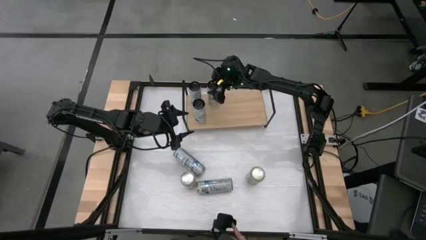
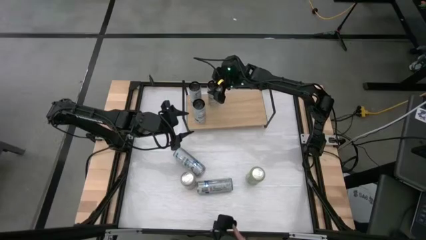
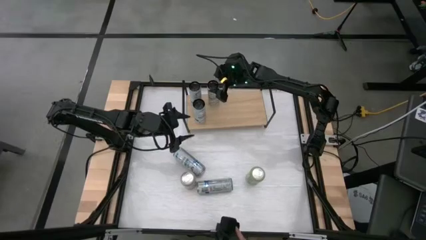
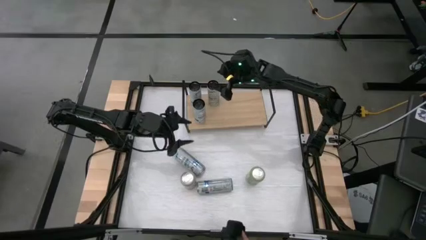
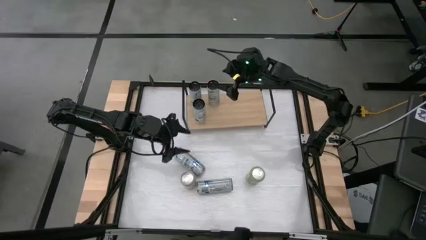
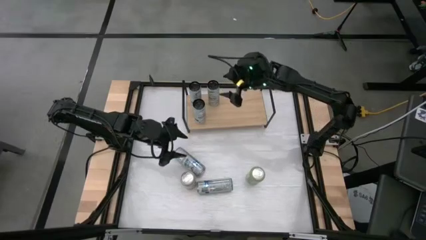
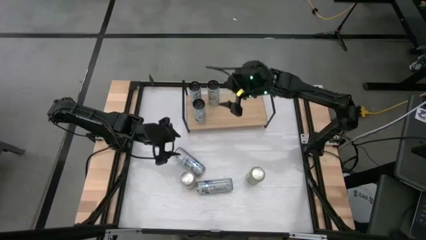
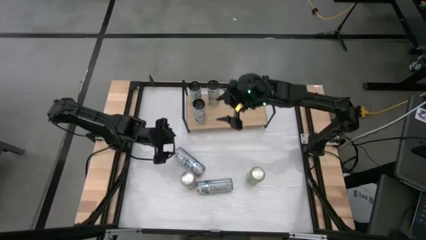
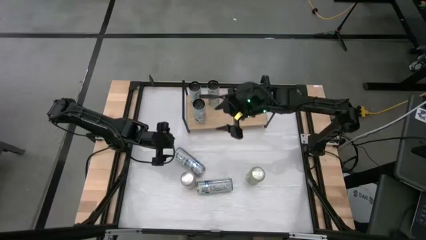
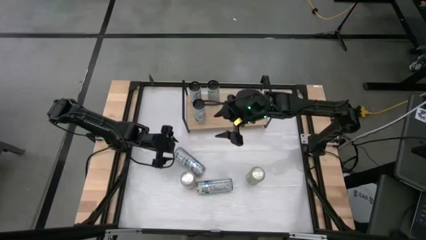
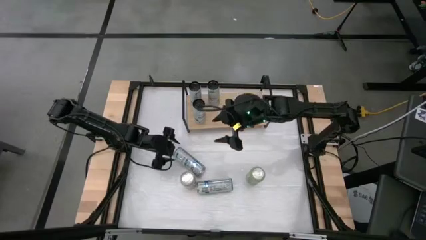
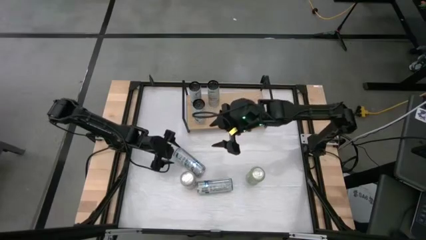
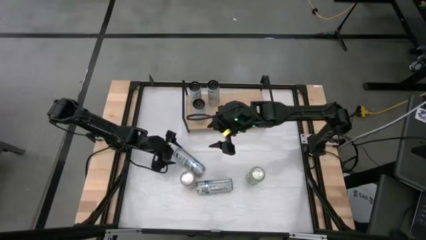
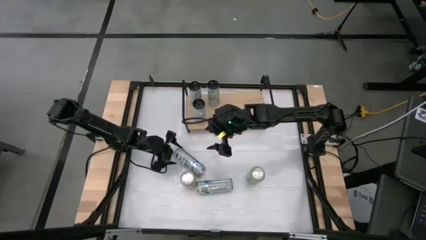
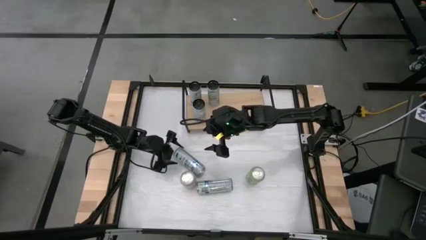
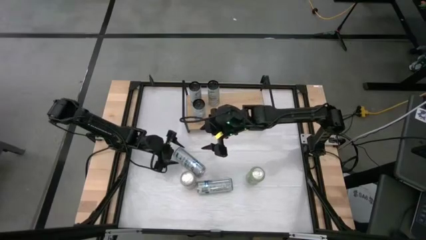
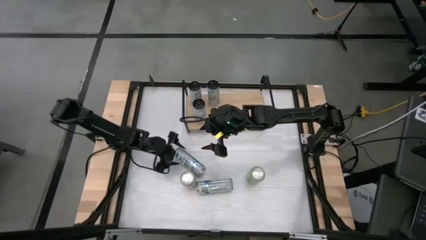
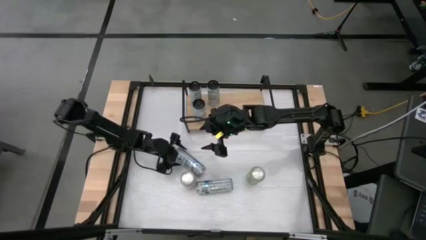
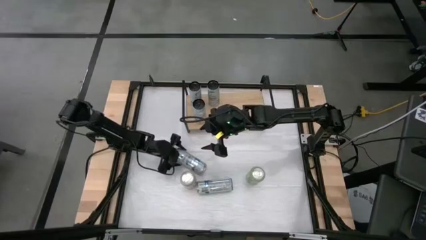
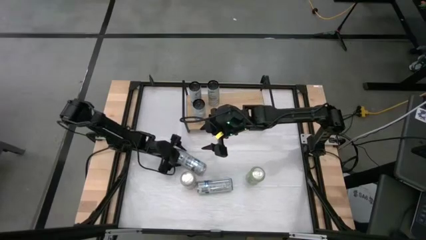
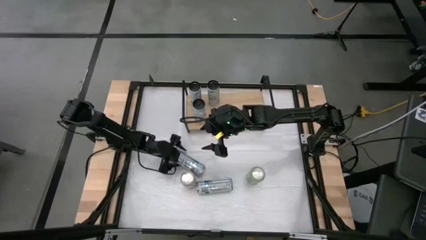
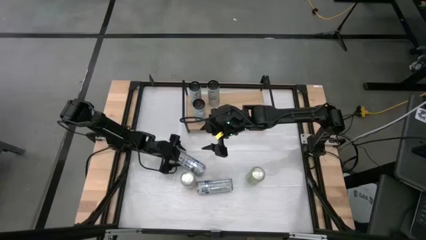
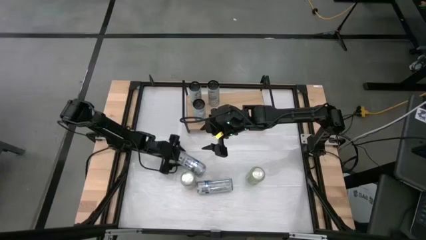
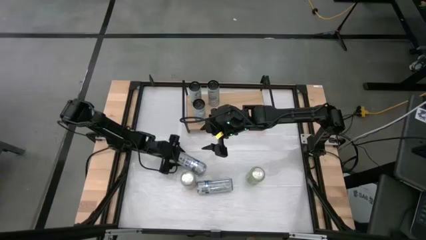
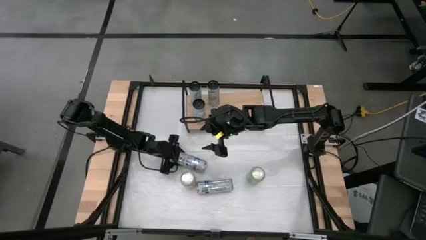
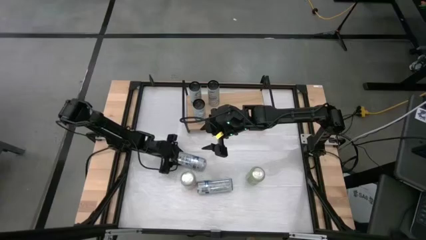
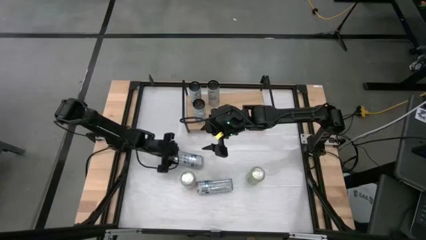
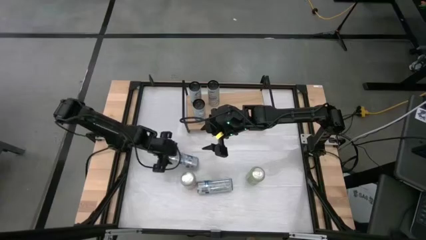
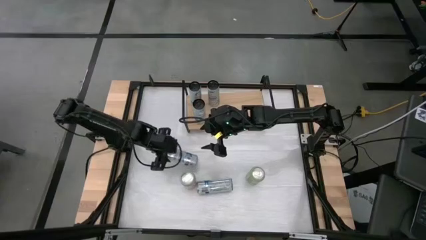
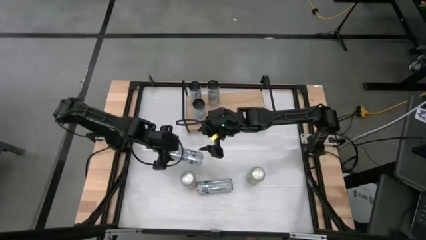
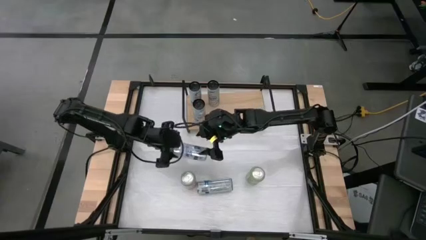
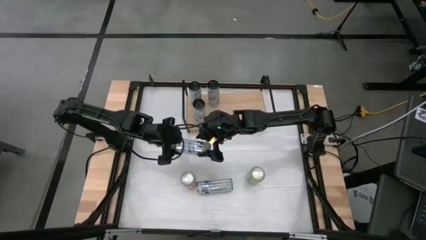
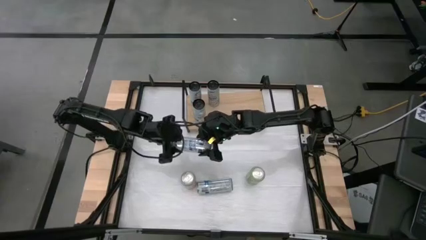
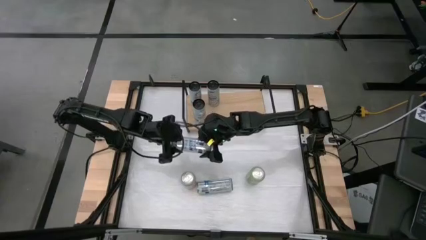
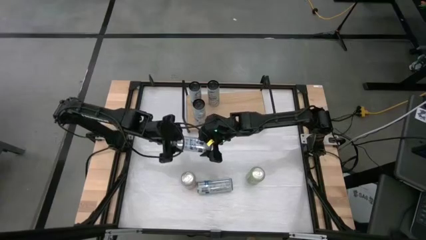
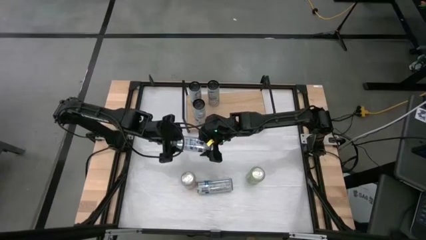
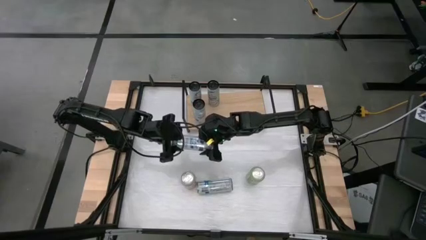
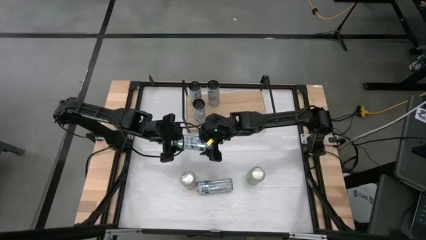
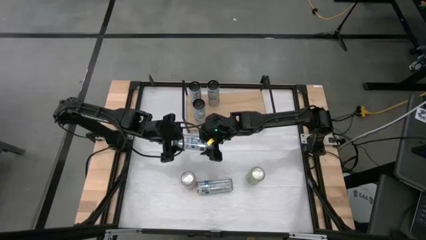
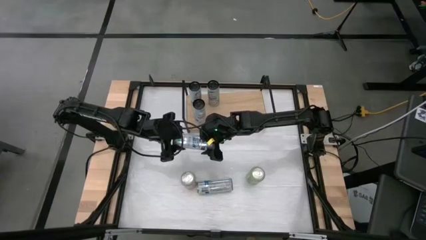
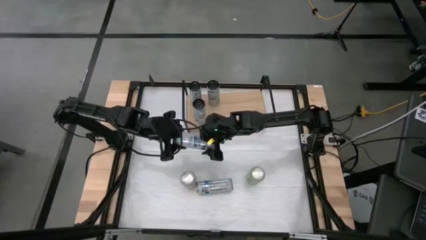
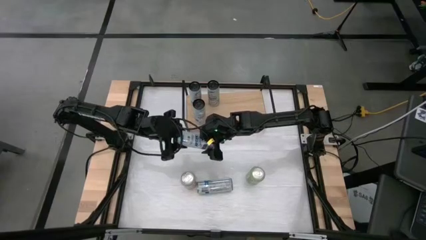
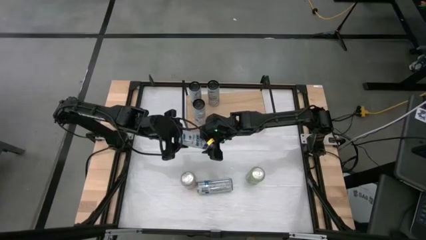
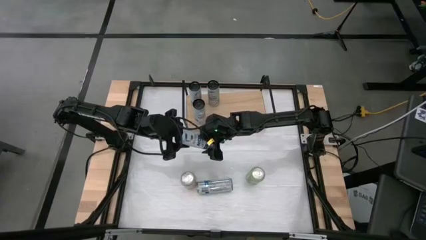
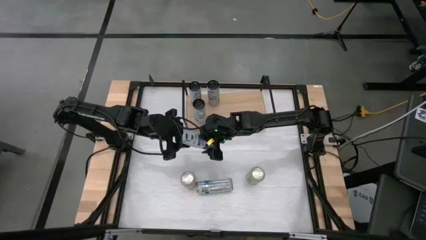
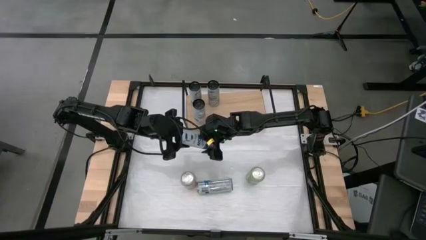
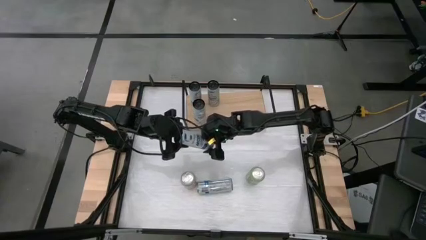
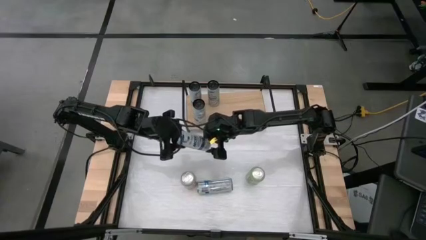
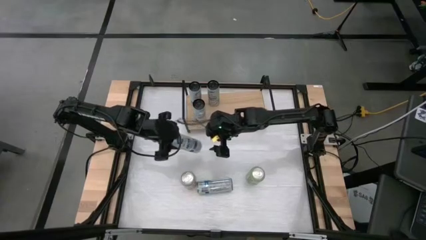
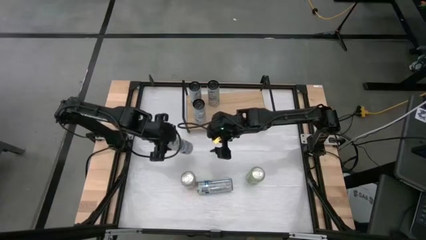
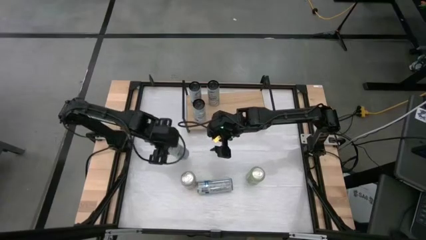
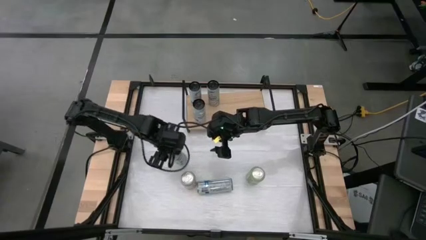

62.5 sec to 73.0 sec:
Task: Place canned beverage on shelf
Put the white-blue soda can aligned with the other white-blue soda can on the shelf

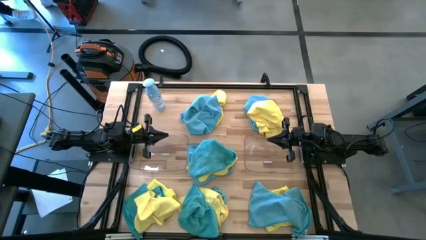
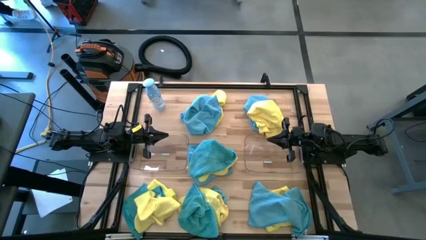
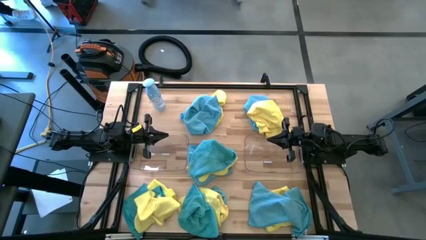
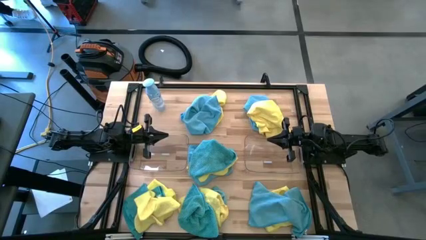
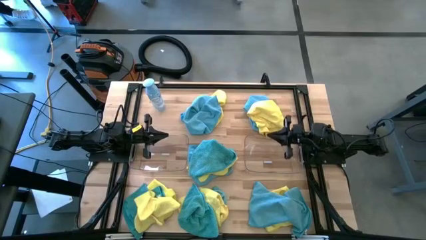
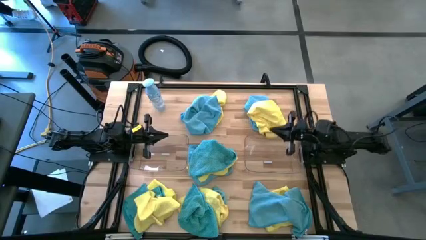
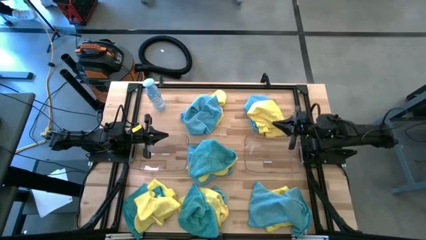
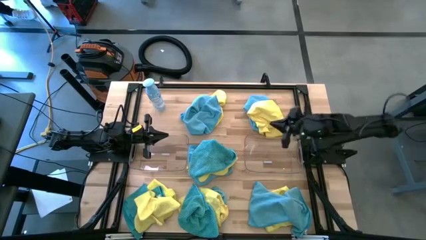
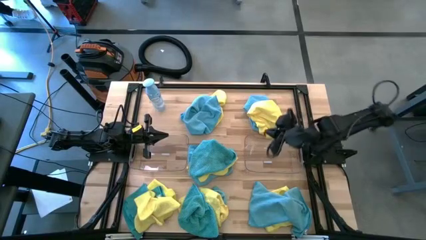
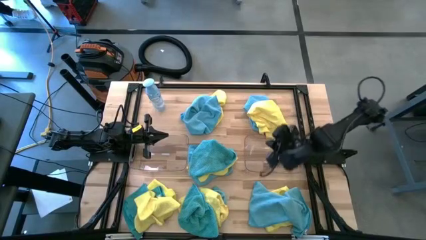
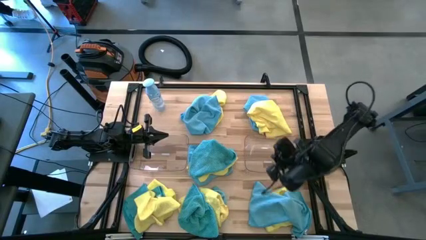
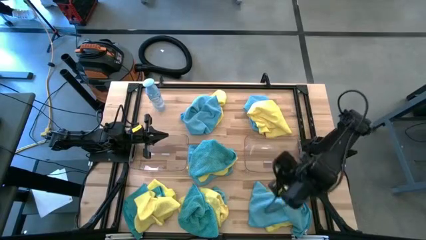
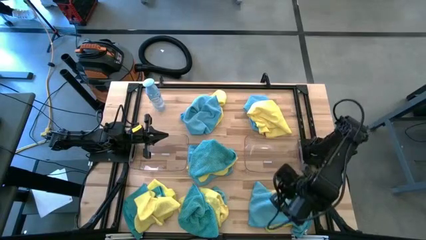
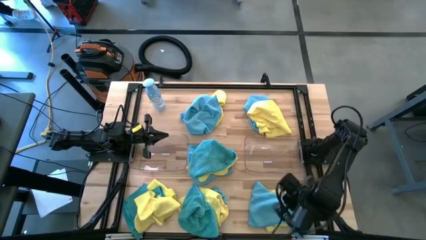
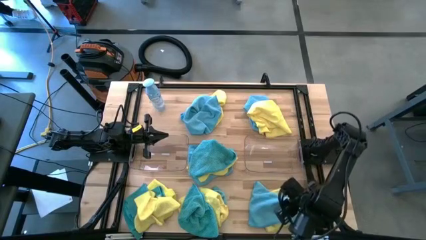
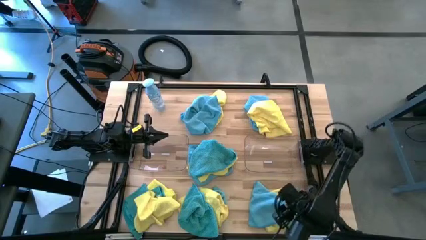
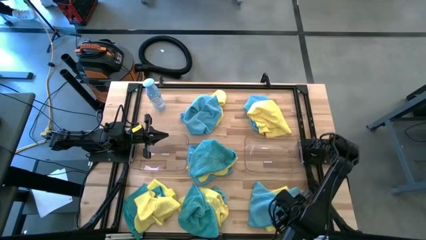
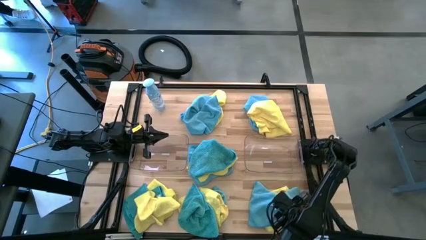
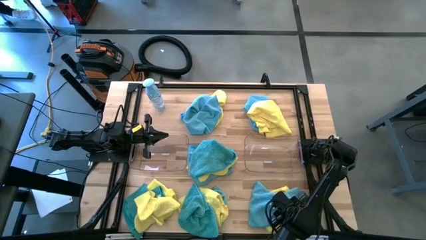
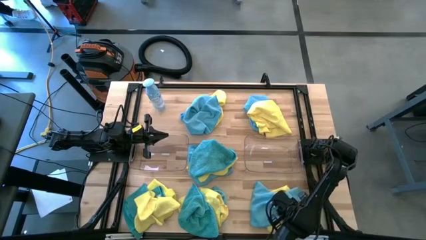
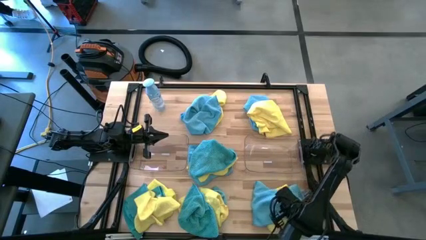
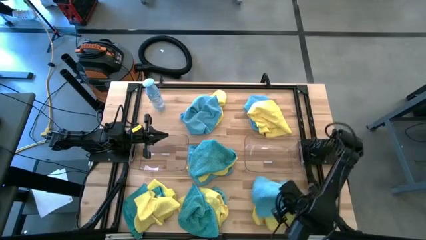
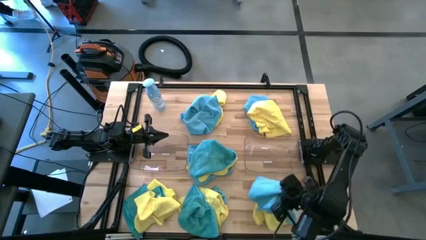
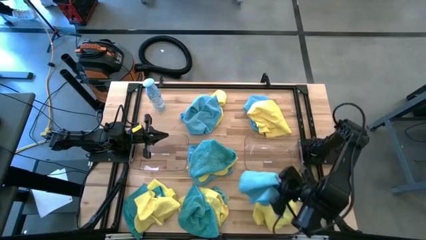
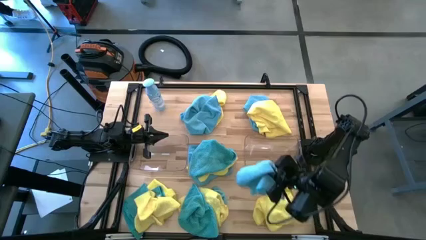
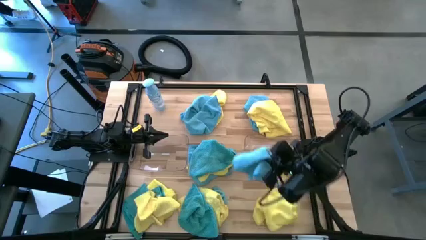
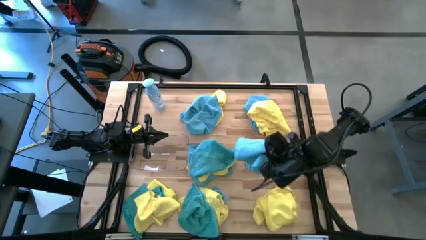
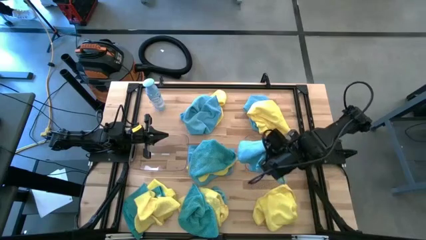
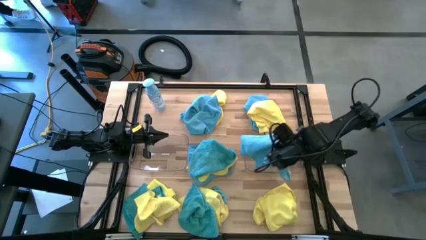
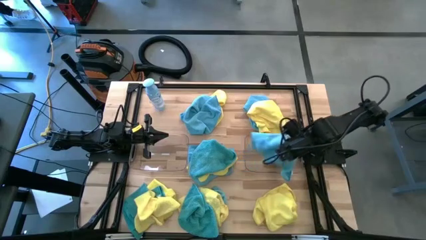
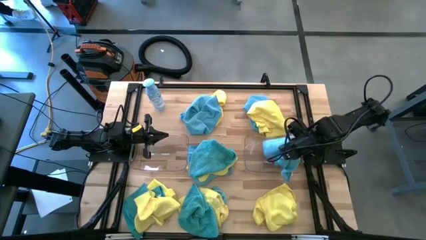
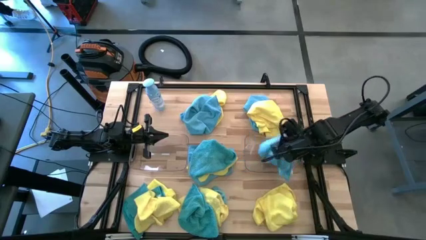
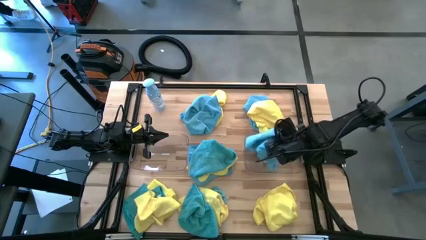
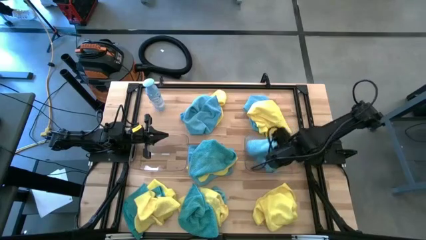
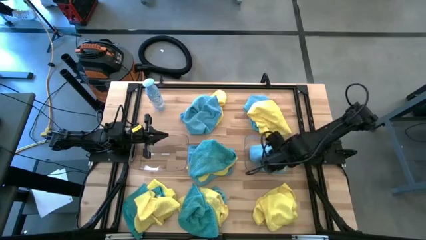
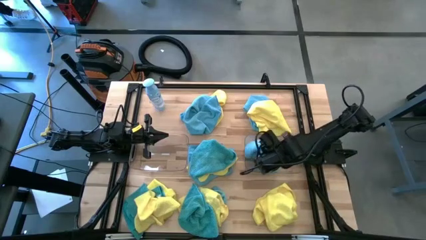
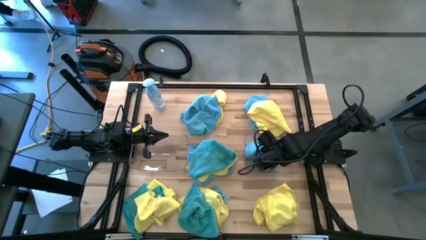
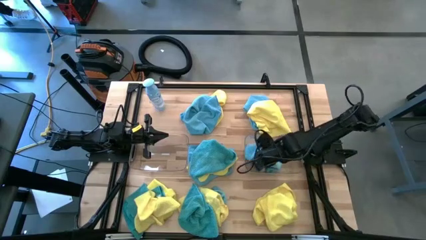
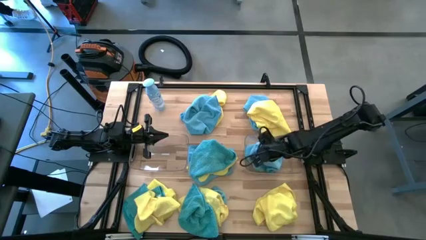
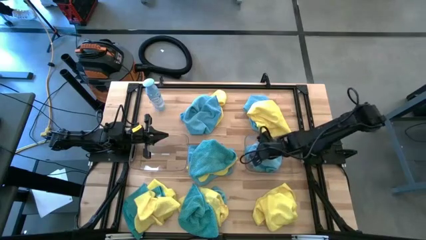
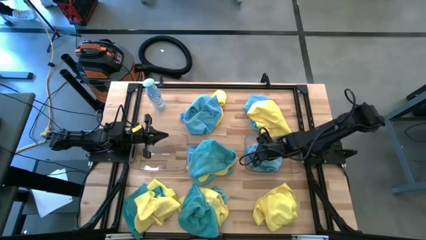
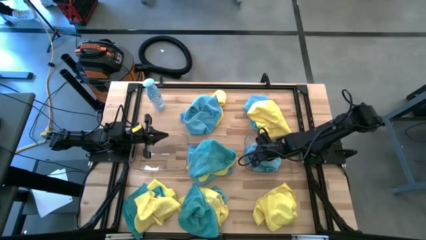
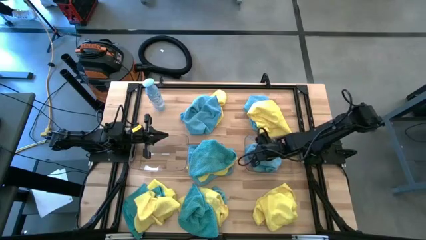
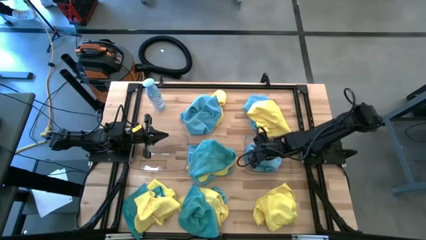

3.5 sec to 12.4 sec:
Task: Sort microfiber towel by color & place in baskets
Put the blue microfiber cloth into the right transparent bin
